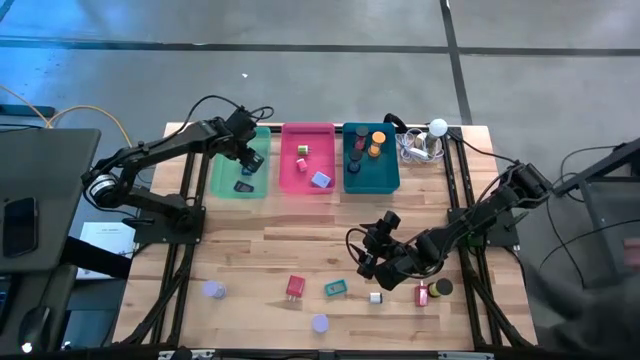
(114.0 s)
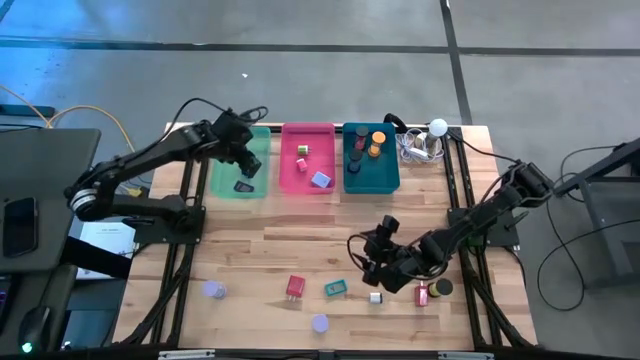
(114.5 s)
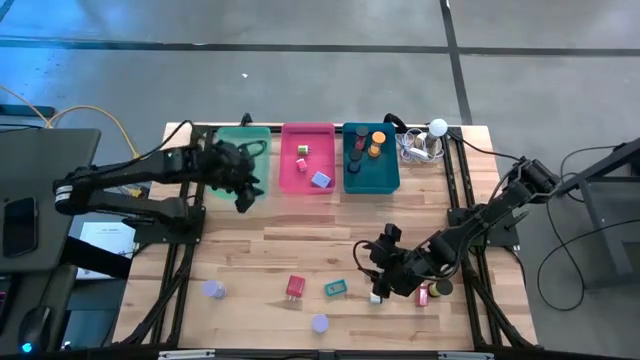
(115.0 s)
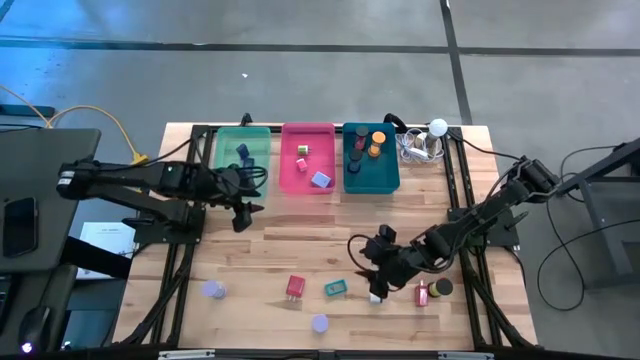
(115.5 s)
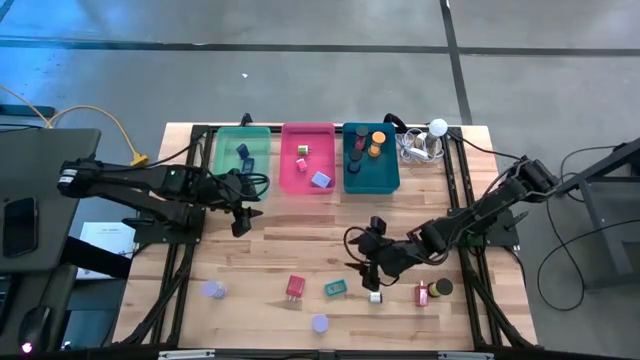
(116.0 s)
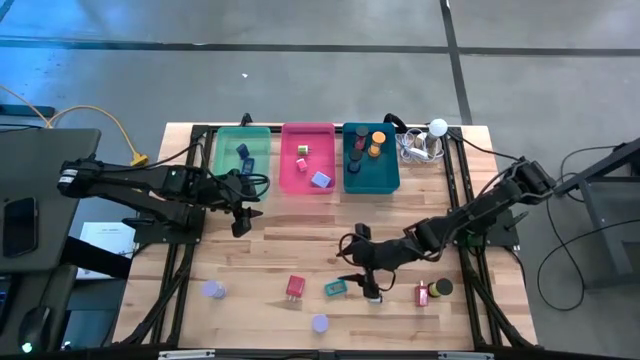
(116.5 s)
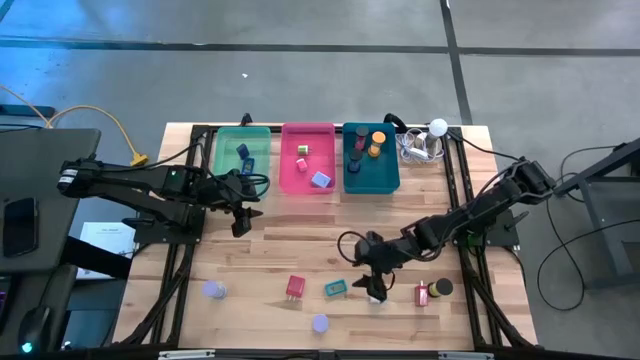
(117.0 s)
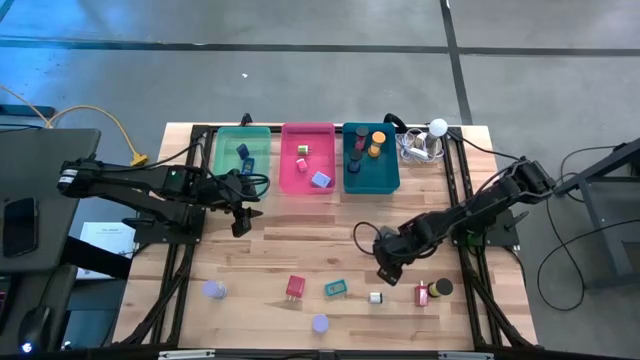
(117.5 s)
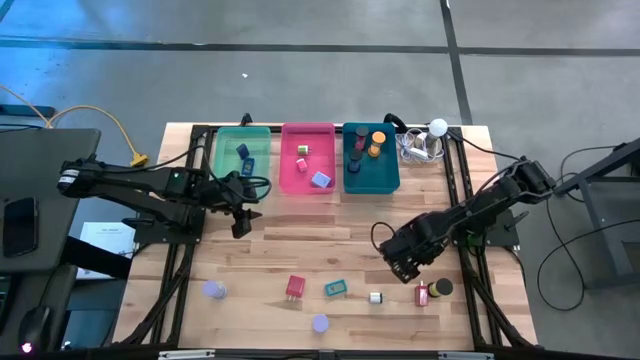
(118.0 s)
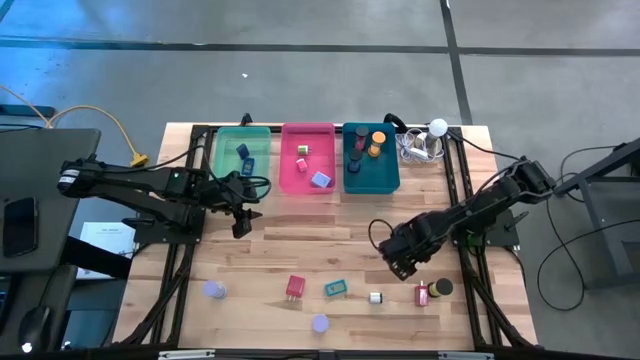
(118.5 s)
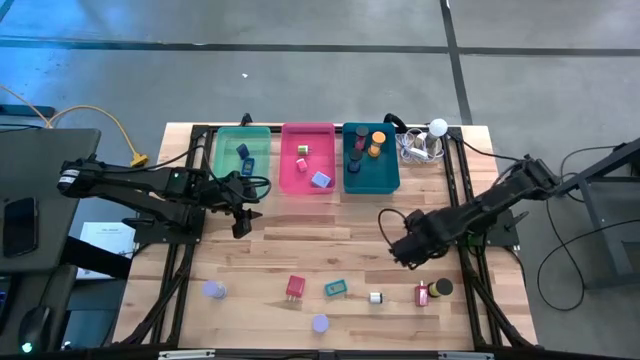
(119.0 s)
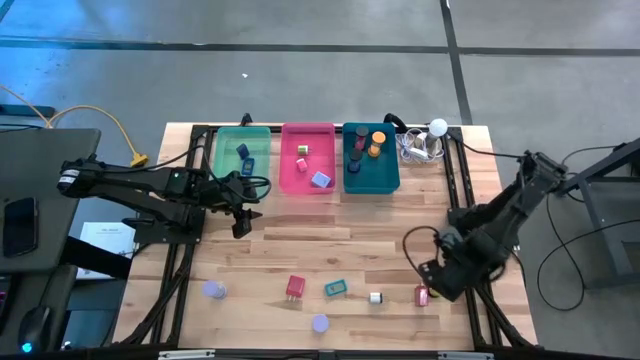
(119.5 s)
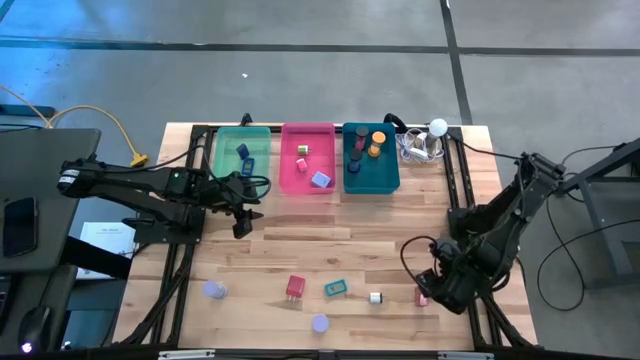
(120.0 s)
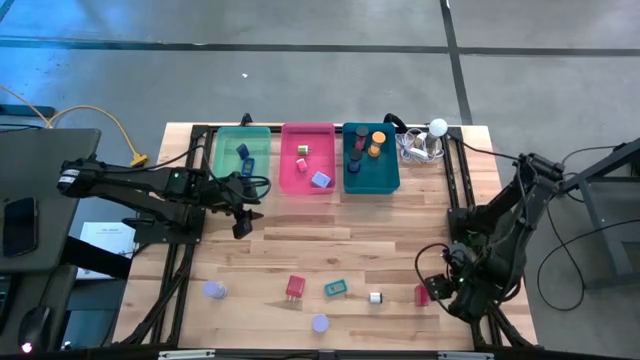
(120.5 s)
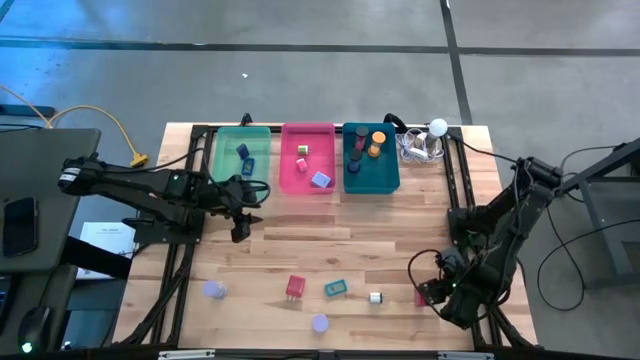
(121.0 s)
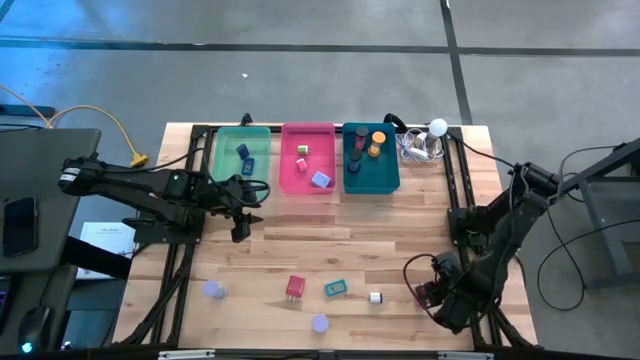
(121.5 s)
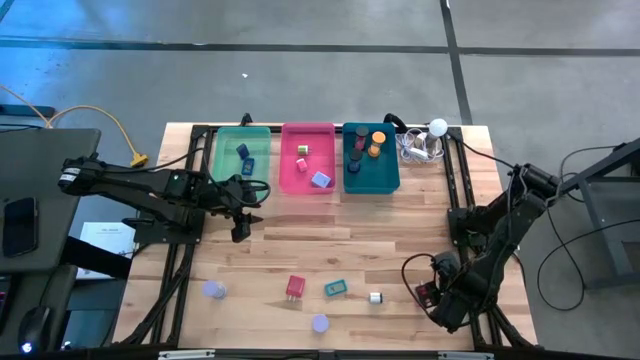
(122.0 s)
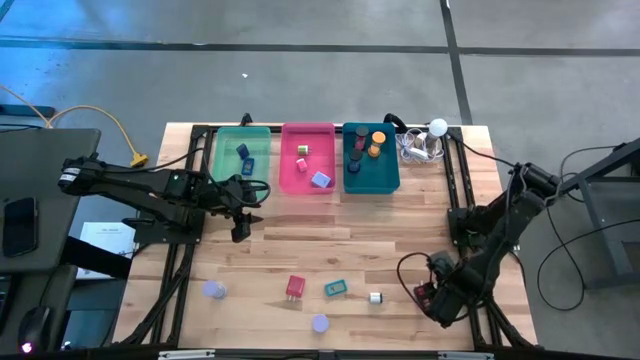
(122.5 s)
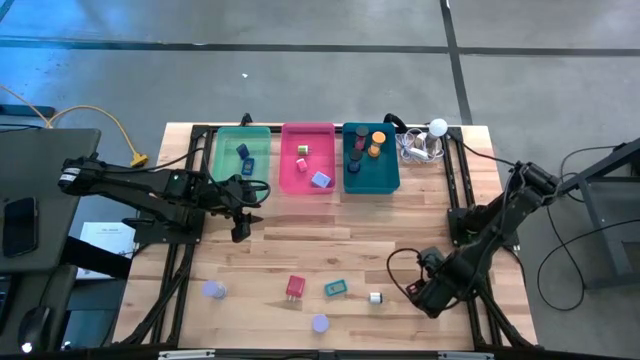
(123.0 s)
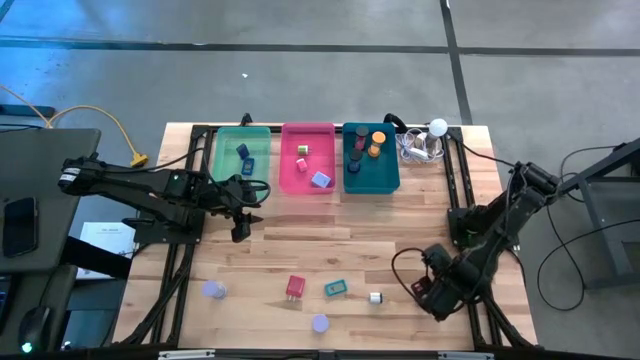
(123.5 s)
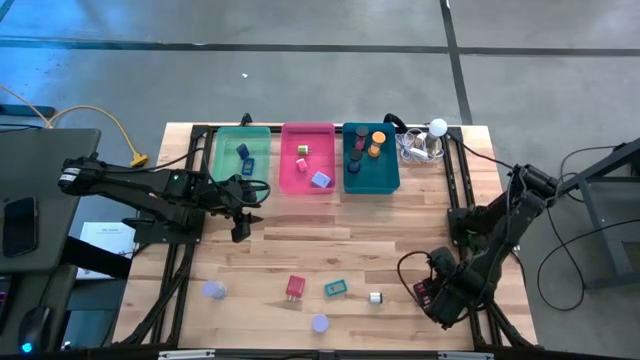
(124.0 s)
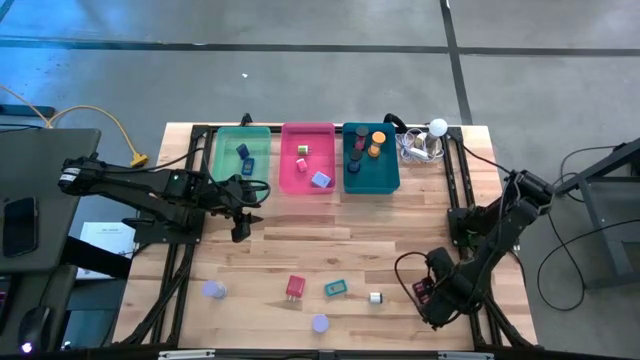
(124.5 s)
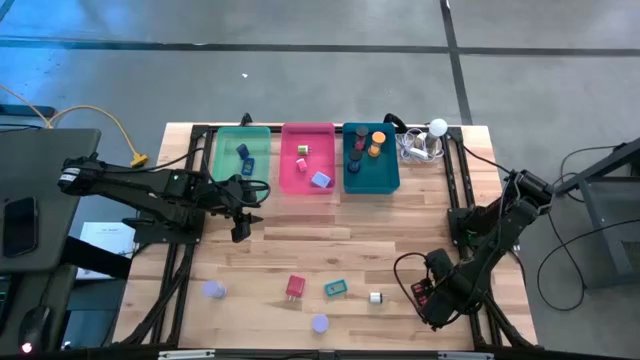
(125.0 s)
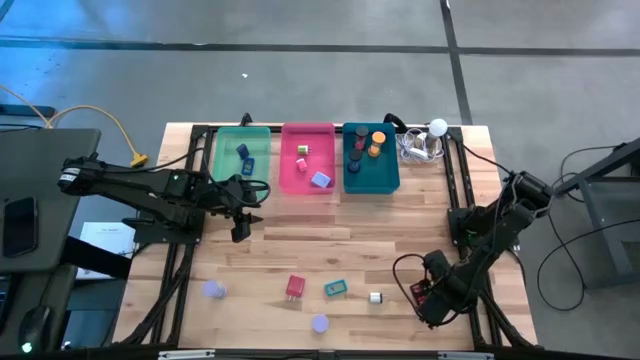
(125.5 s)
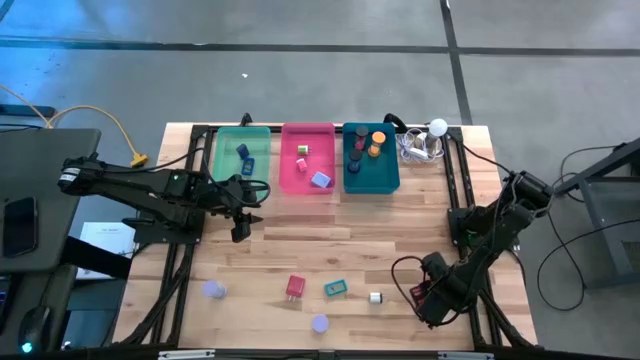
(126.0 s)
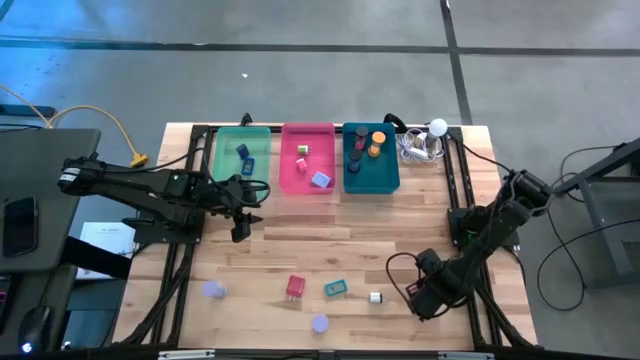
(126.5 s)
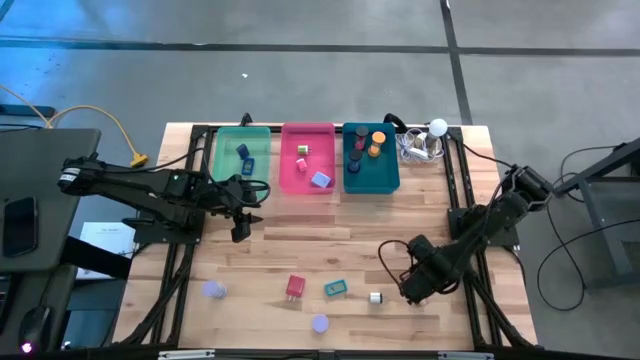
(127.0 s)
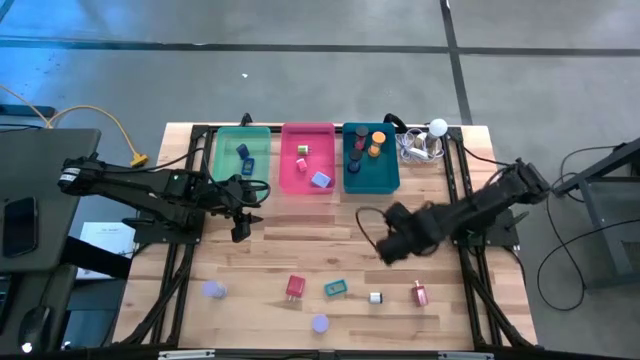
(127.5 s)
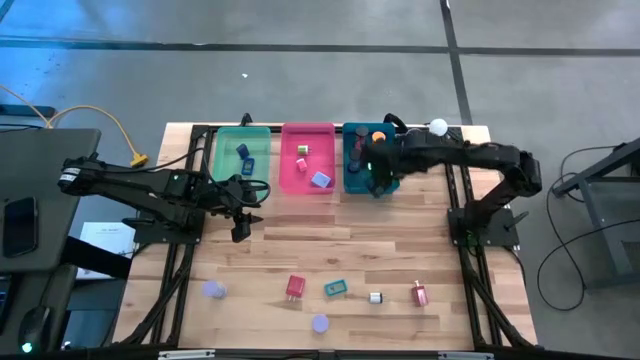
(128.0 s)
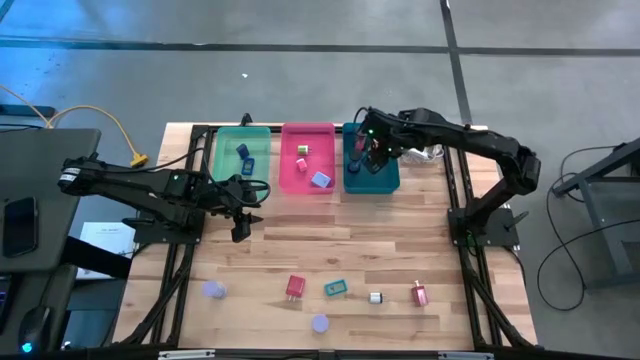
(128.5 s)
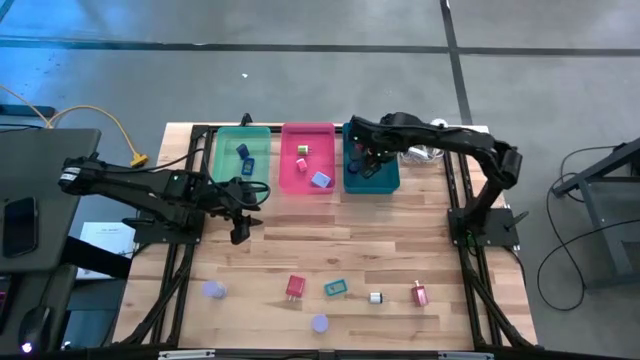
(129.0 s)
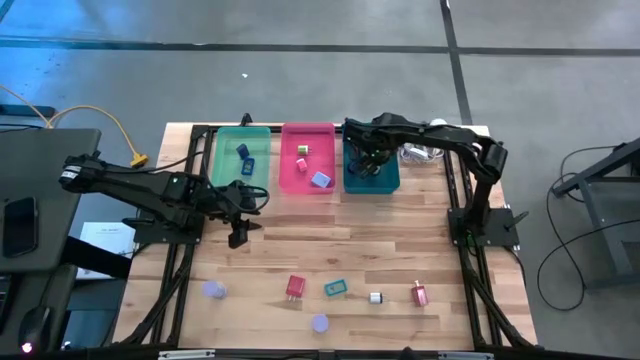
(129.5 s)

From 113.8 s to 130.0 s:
Task: Pick & Place Office items
Put the green hourglass into the blue bin

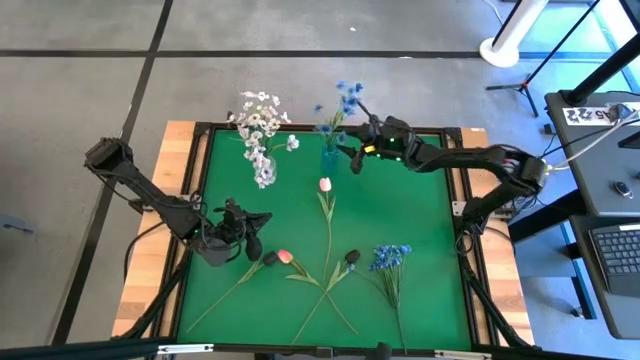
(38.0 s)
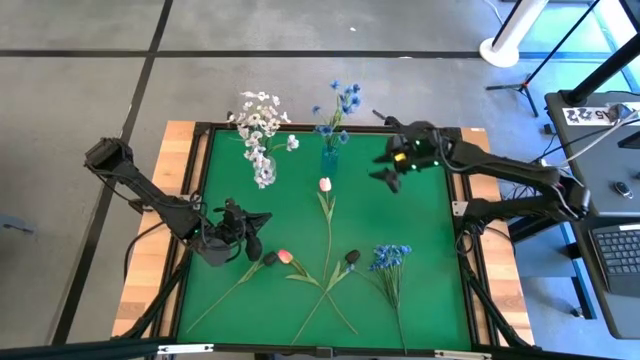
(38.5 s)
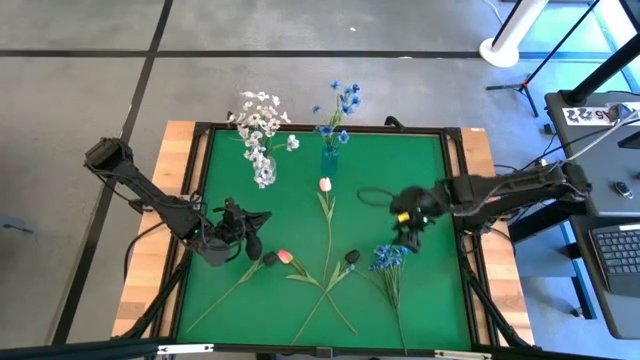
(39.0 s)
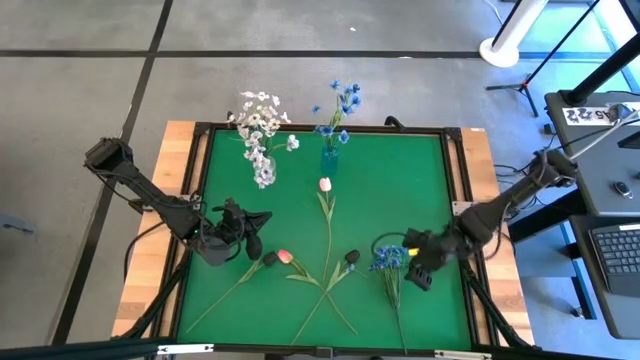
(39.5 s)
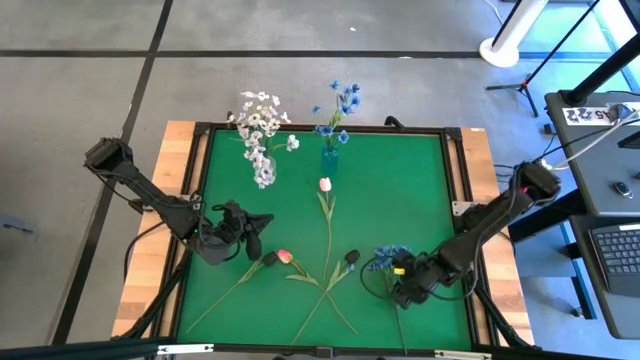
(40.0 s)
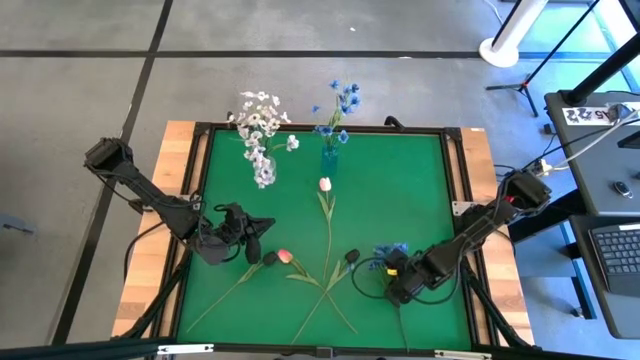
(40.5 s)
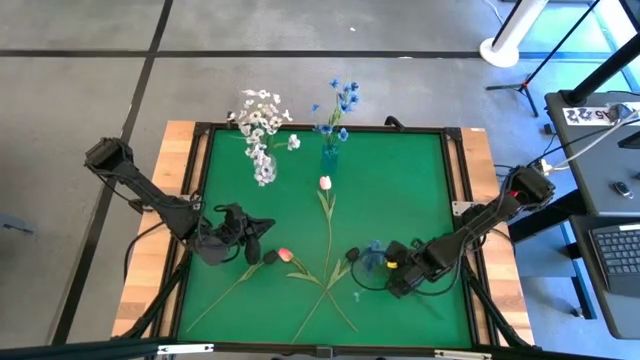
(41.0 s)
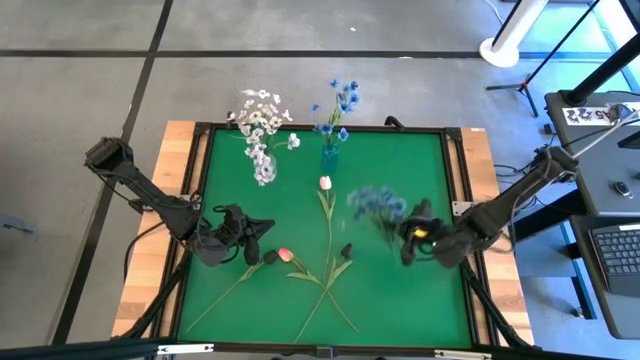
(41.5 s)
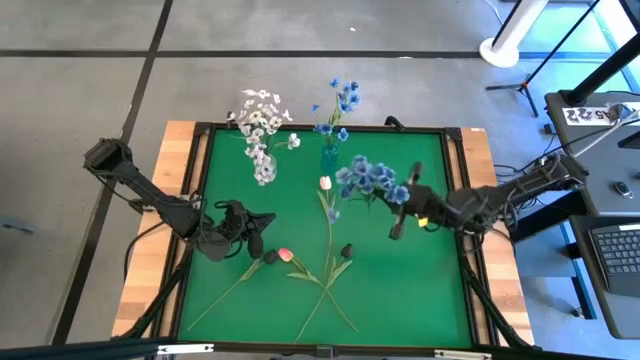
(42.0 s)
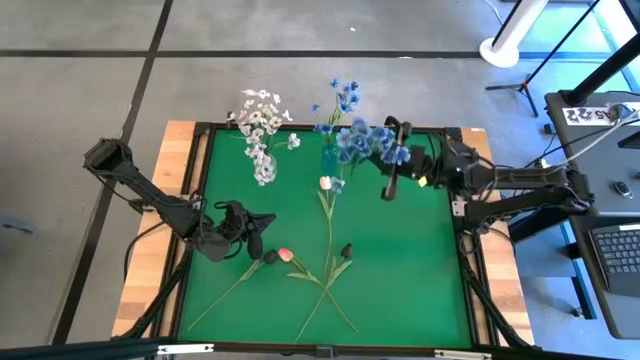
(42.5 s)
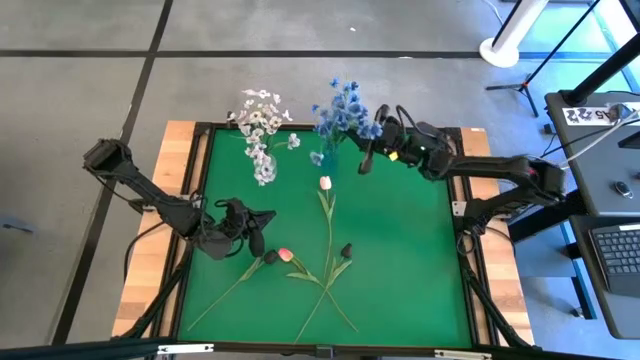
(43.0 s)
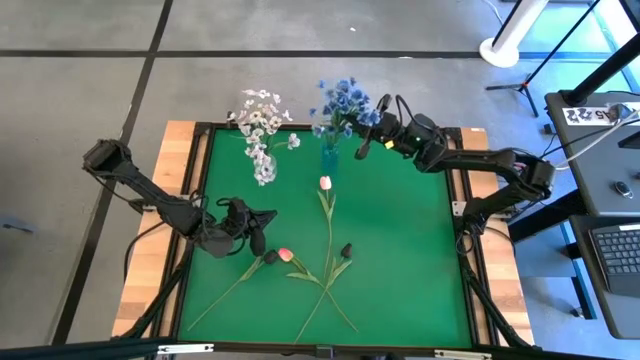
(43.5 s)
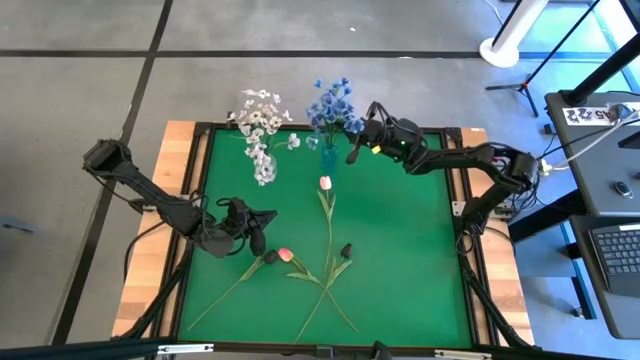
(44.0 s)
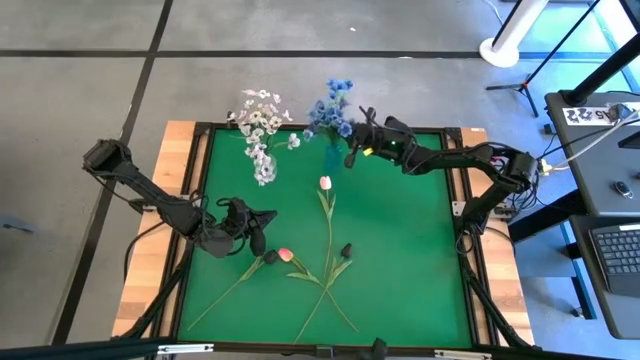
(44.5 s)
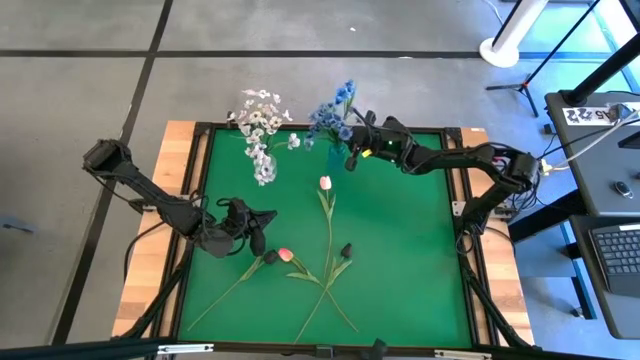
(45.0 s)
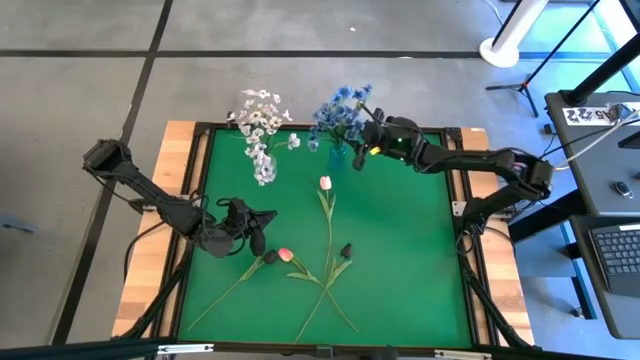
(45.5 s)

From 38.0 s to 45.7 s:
Task: Sort flowers into vase by color
Put the blue flowers into the blue vase
